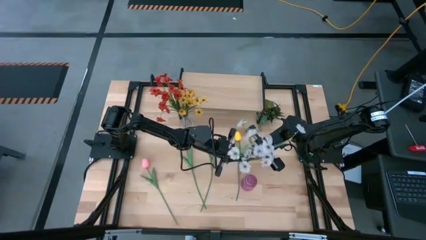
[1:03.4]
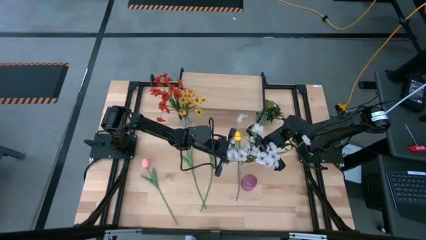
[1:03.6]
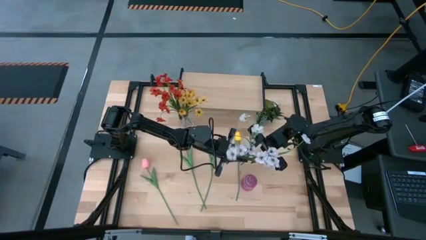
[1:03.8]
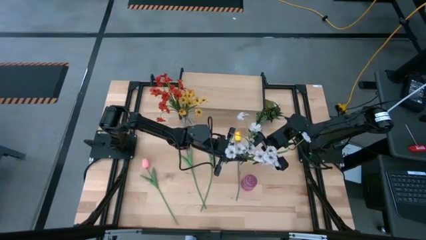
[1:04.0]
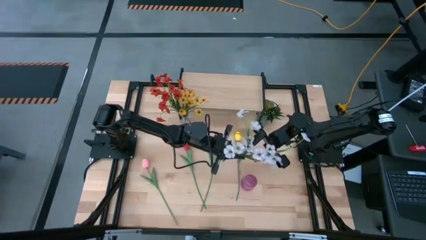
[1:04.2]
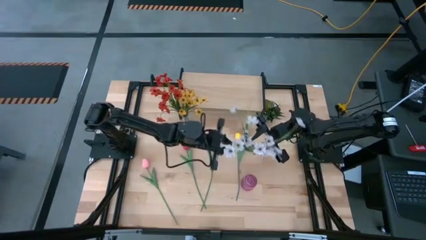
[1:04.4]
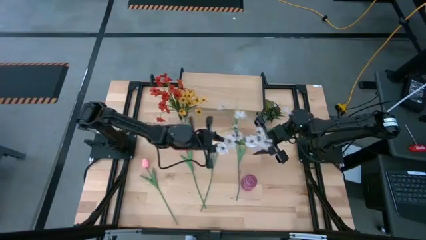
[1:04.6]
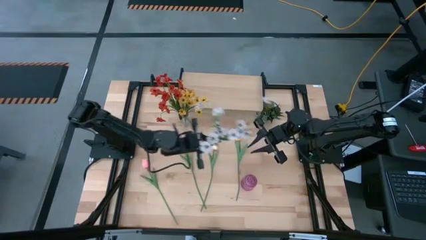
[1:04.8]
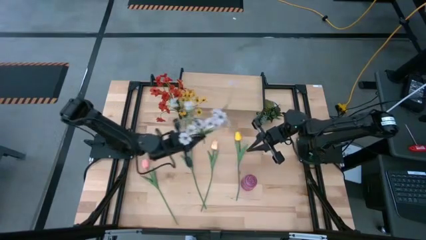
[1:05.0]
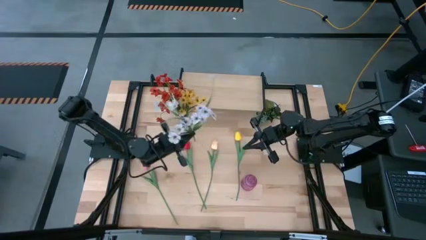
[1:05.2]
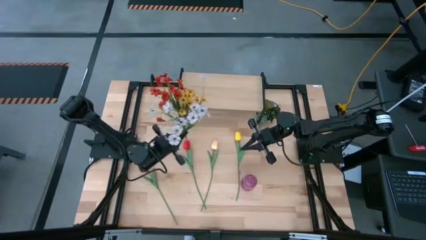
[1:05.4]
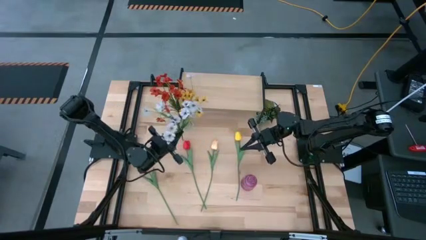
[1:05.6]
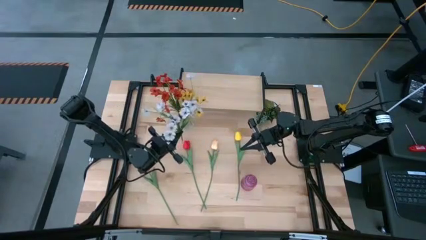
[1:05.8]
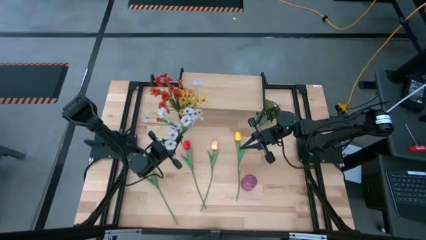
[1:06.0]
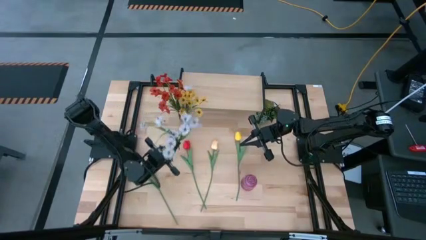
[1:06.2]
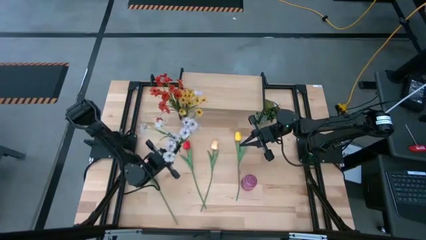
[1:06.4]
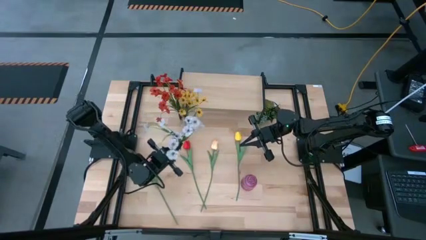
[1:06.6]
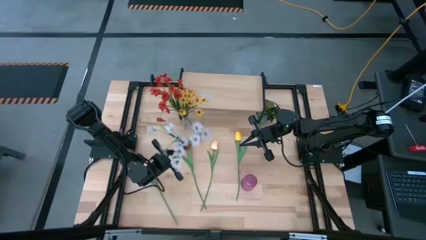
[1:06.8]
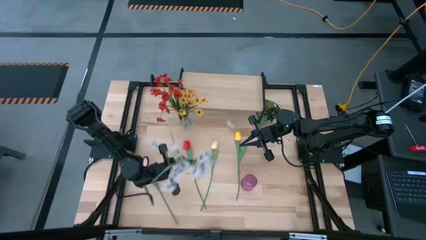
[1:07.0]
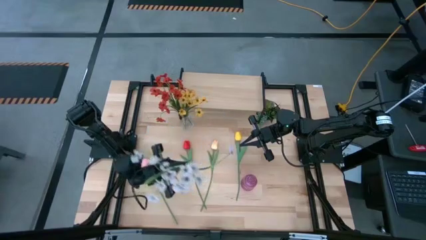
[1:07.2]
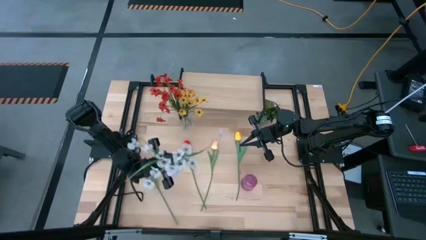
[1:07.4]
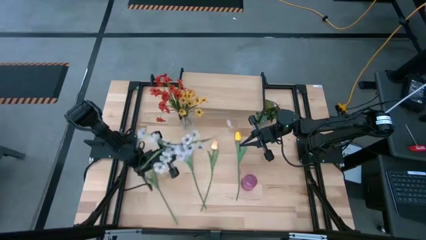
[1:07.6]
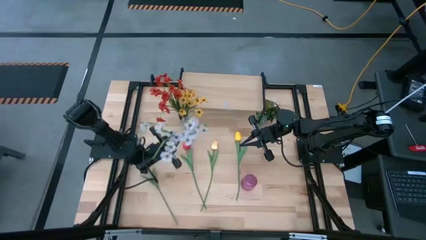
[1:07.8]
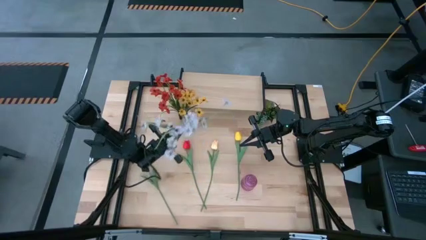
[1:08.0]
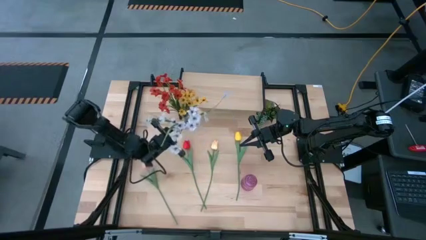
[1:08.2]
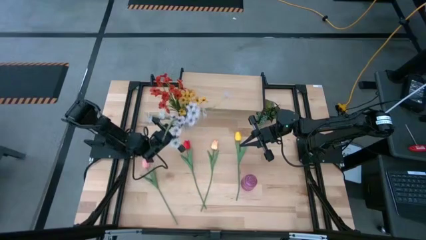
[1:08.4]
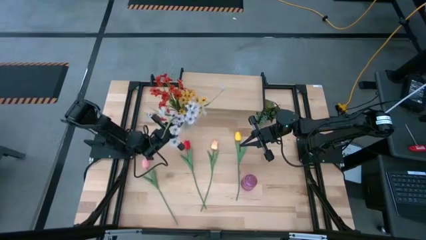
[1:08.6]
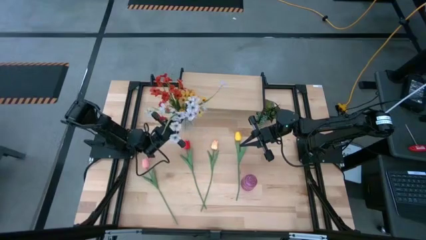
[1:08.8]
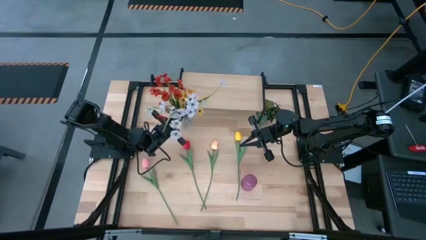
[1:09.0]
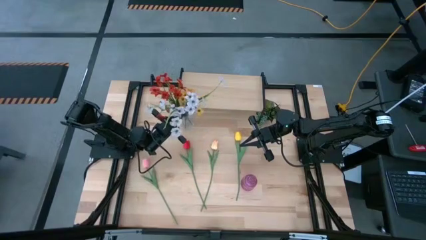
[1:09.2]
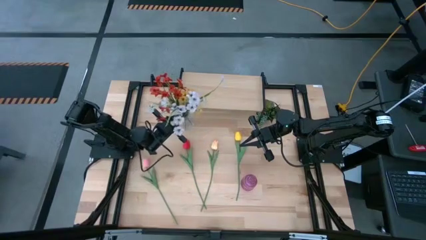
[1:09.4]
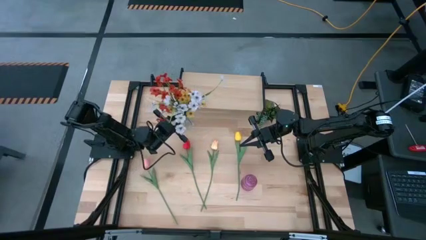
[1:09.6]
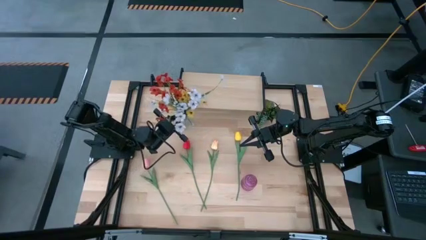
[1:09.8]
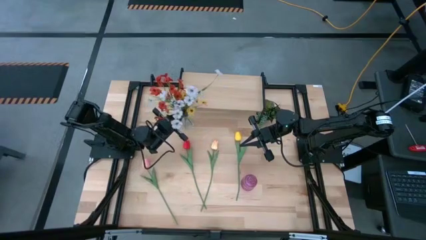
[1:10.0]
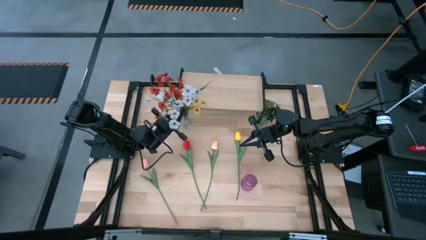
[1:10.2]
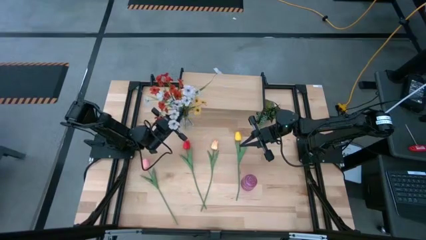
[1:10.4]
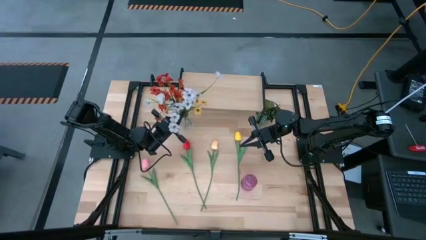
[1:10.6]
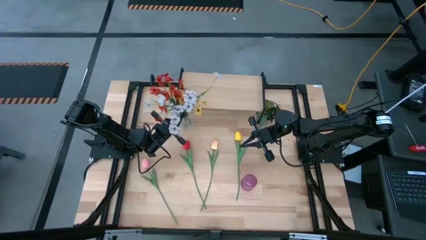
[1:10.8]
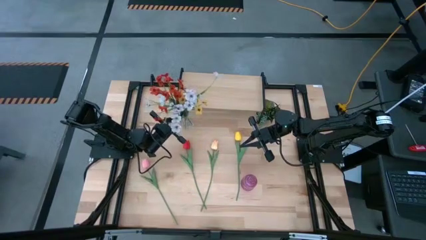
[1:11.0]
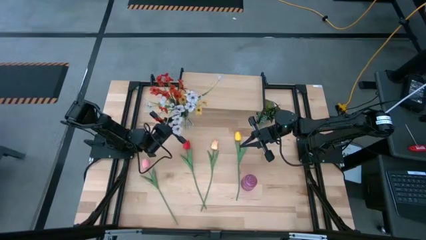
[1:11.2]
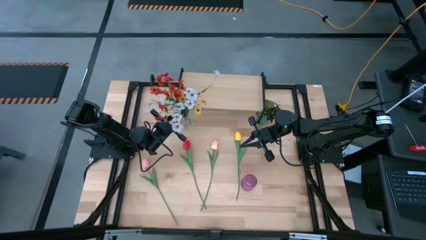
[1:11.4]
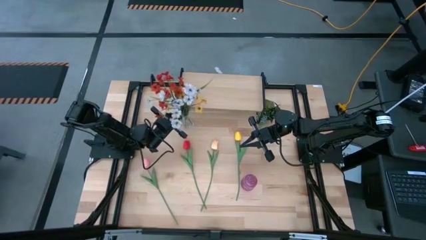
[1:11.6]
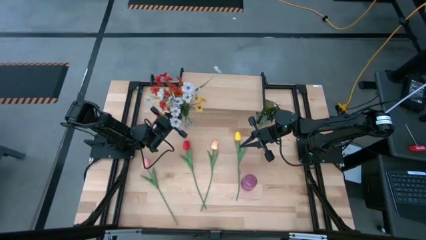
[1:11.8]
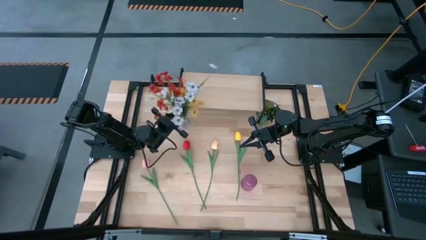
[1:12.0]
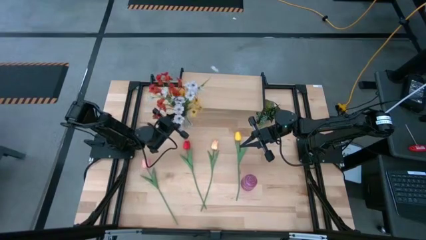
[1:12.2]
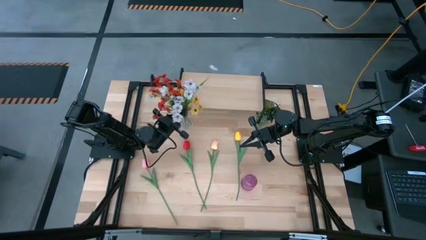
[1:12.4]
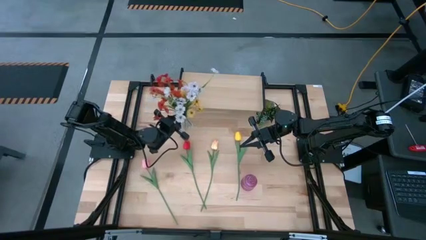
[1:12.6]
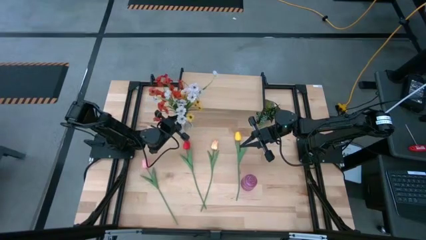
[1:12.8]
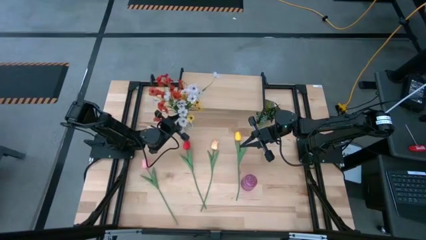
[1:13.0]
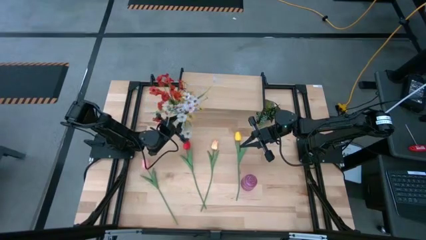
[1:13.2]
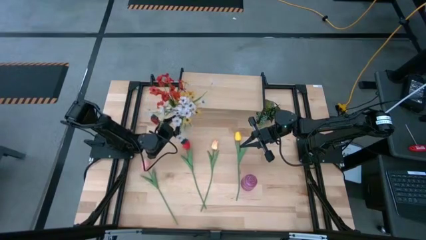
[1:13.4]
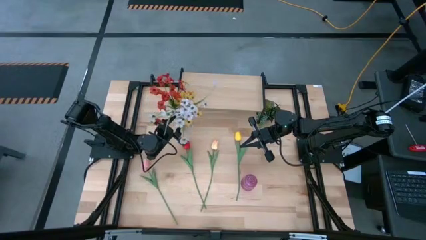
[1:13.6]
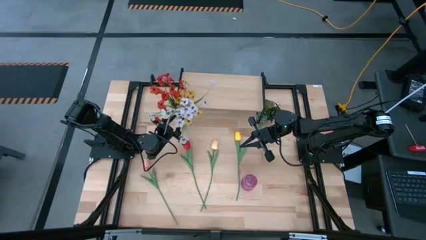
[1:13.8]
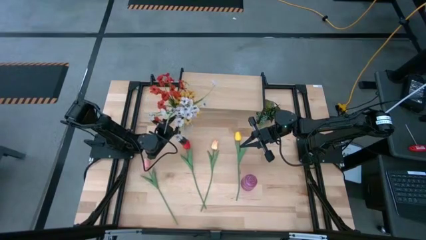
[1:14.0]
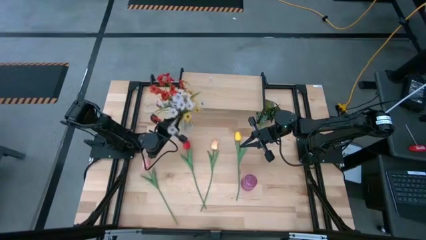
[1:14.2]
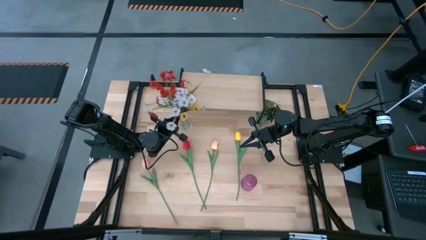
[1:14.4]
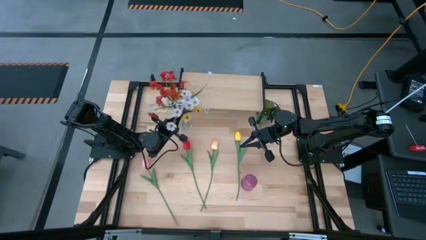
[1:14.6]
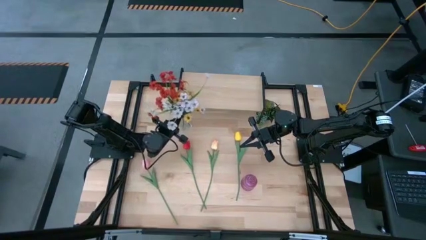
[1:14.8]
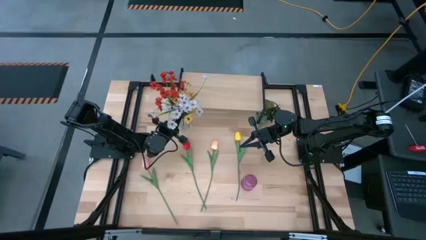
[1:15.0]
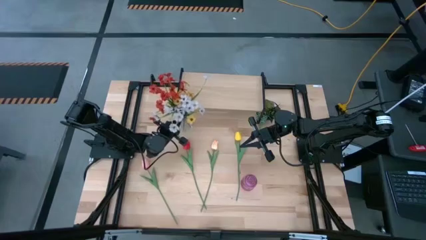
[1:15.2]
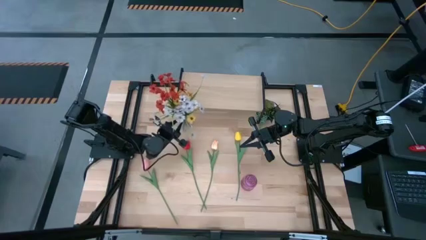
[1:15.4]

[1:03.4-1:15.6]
Task: Pick and place flowers into a vace then onto a shelf
Put the white flowers into the transparent vase
